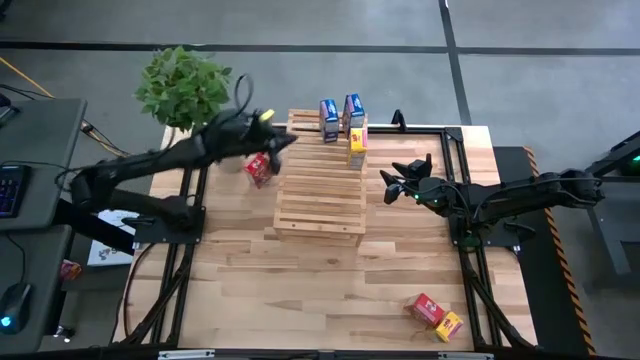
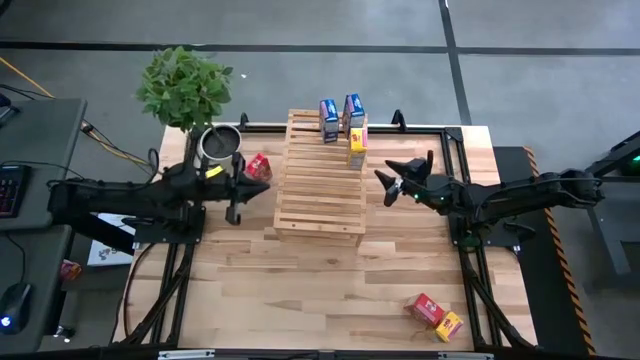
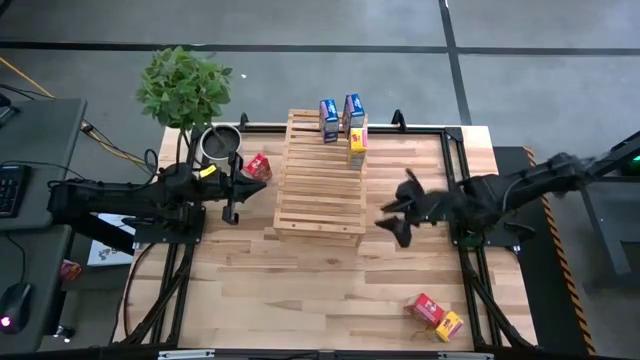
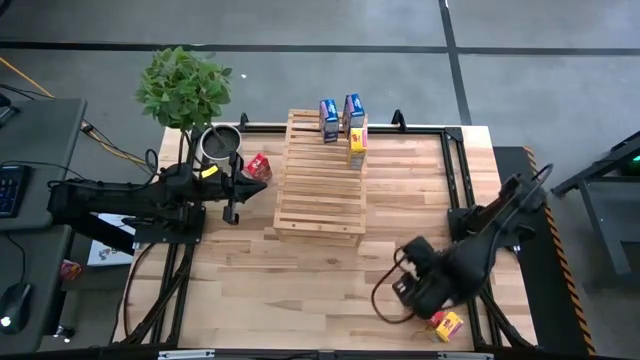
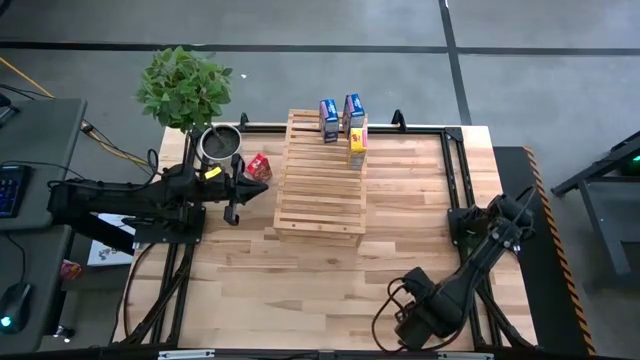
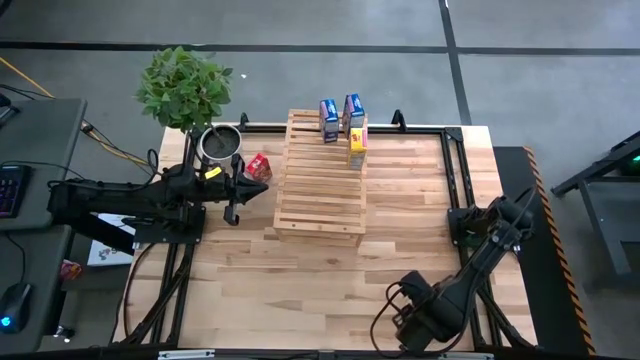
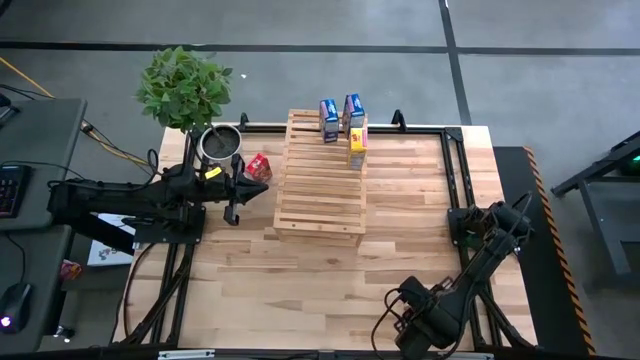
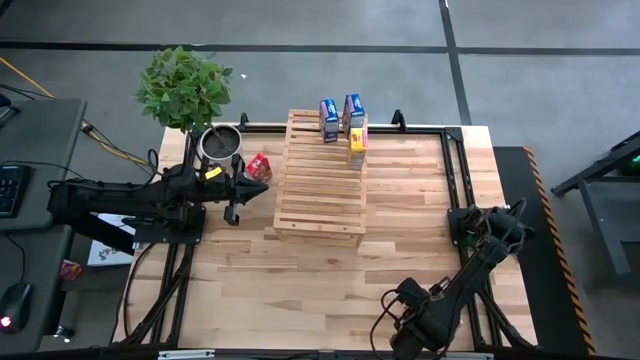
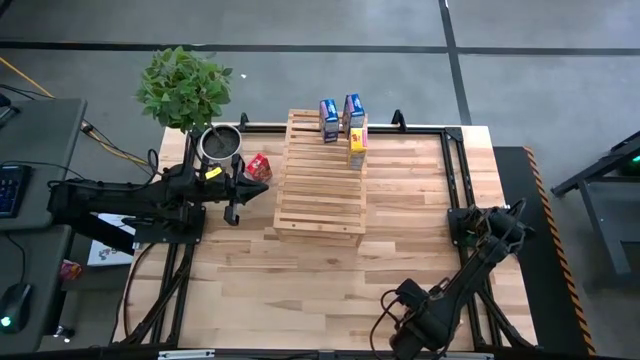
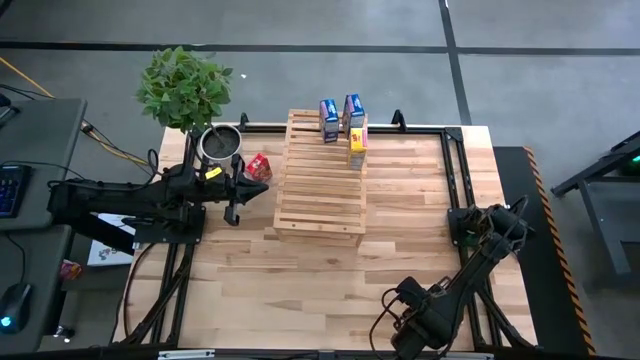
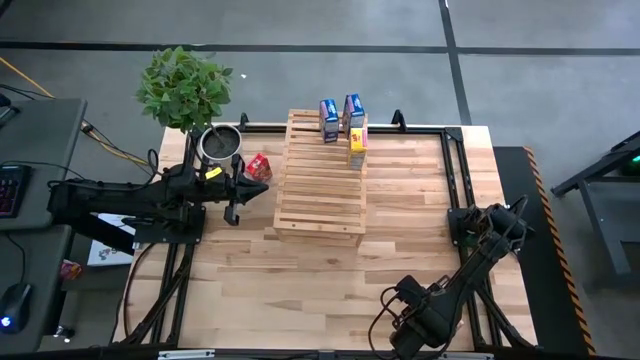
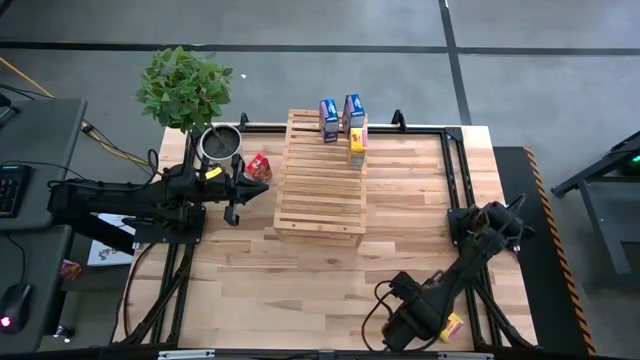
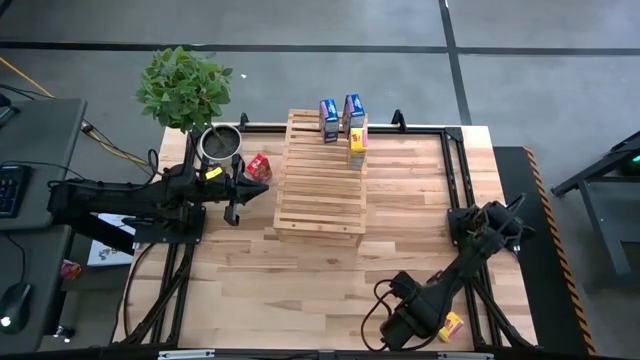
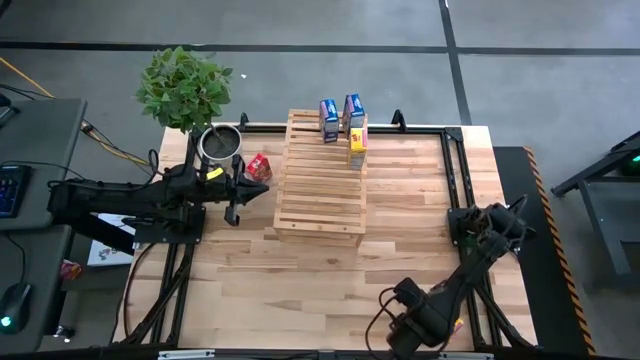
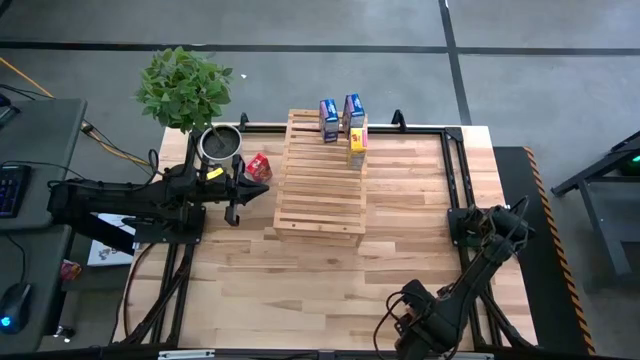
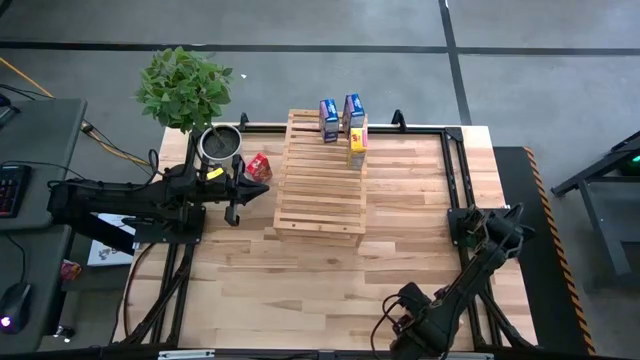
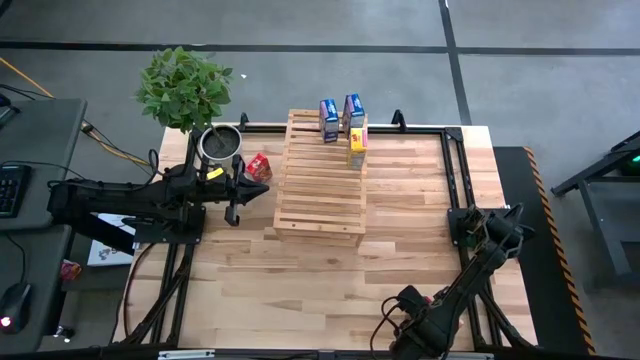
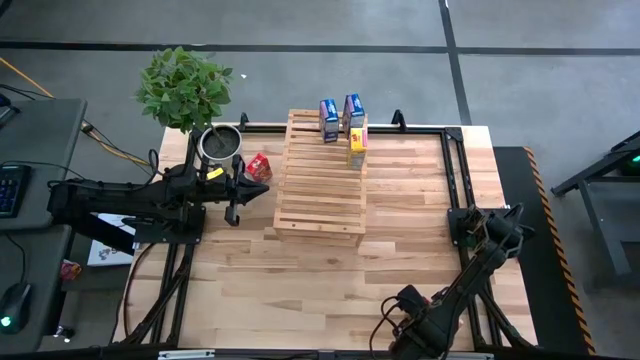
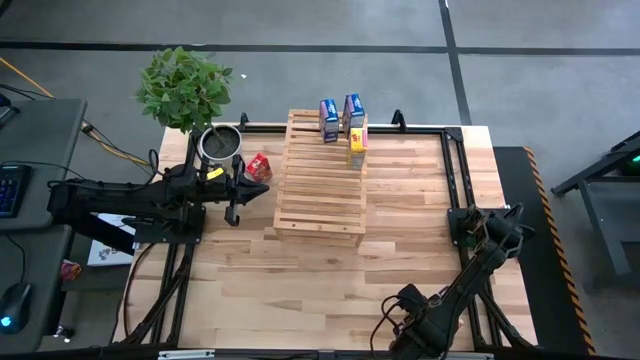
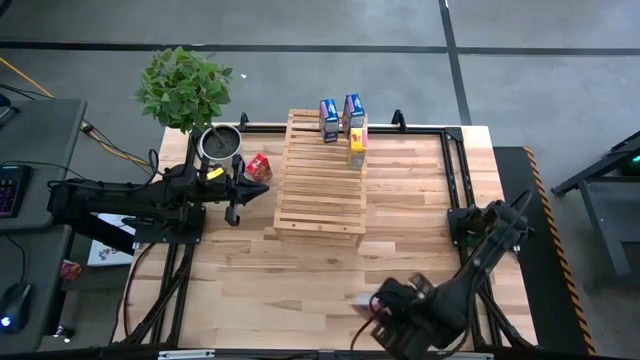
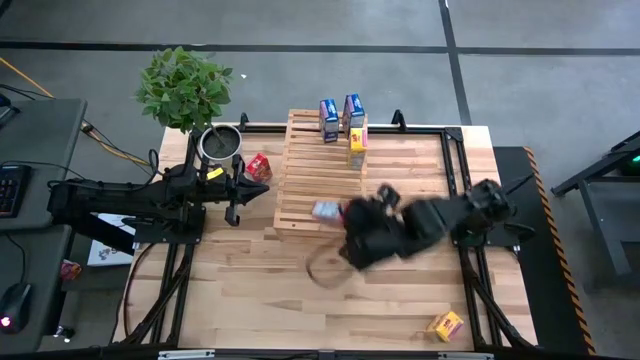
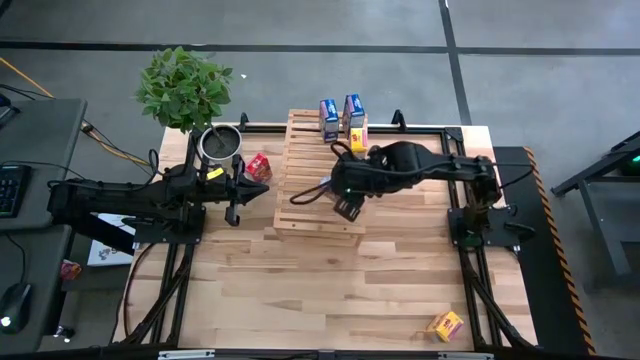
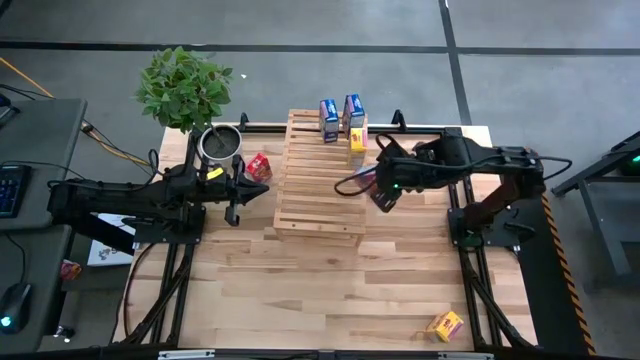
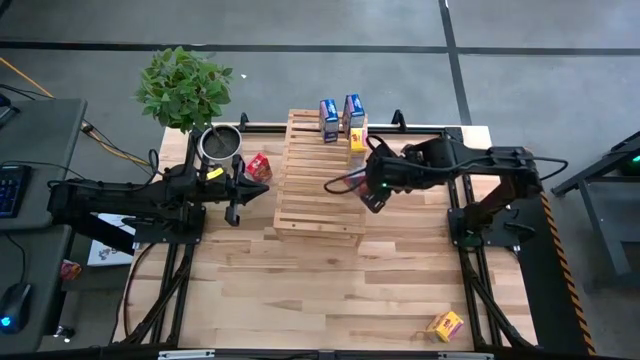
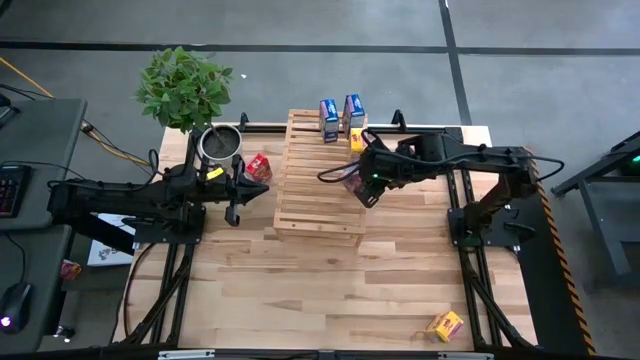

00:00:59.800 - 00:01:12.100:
Task: Stack cereal on shelf
Put the bottom red cereal box on the shelf

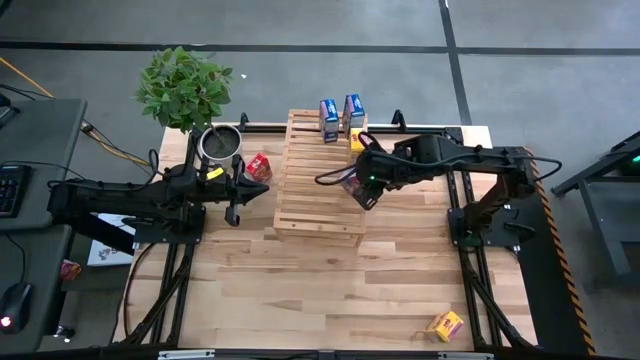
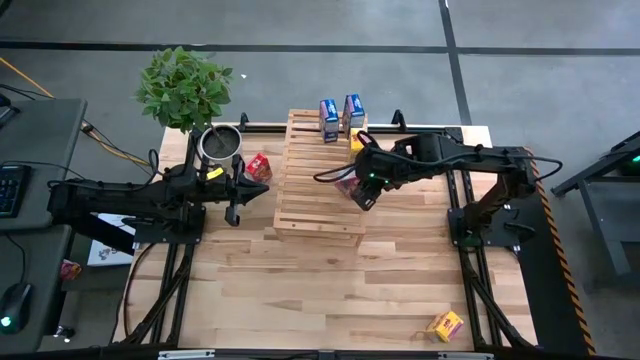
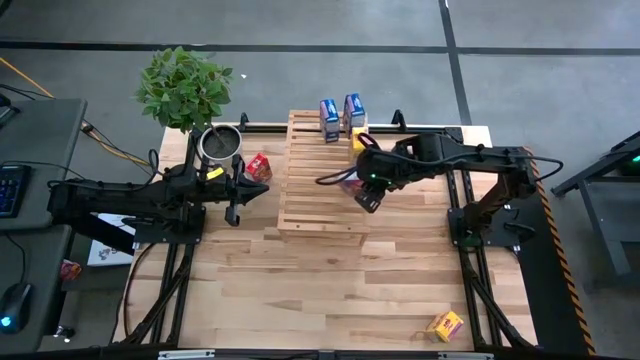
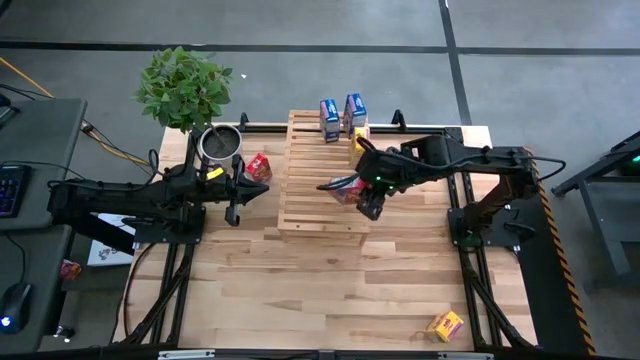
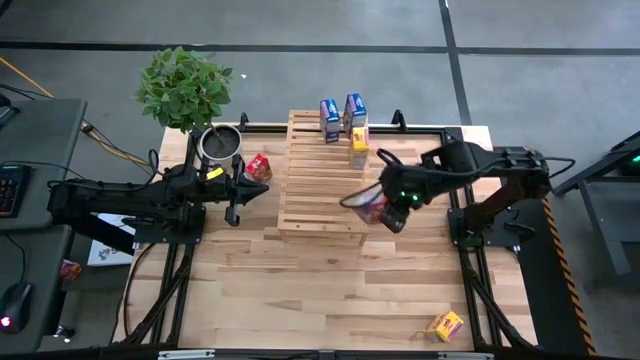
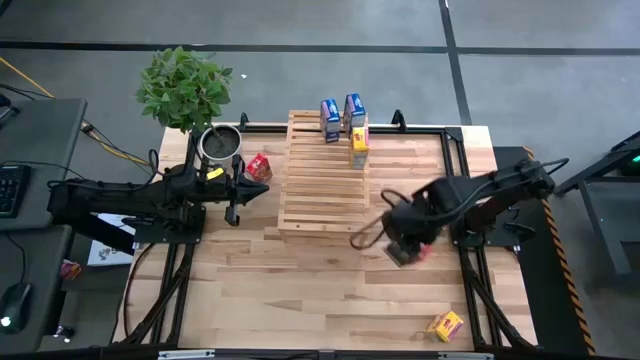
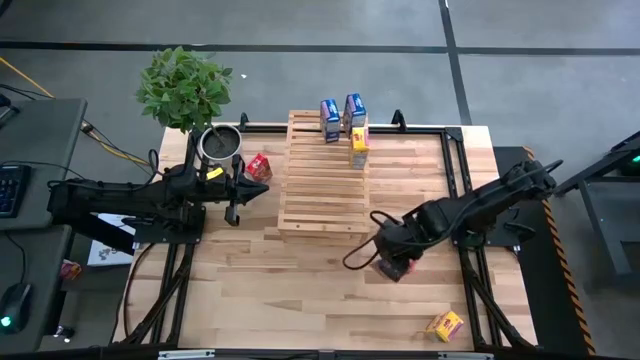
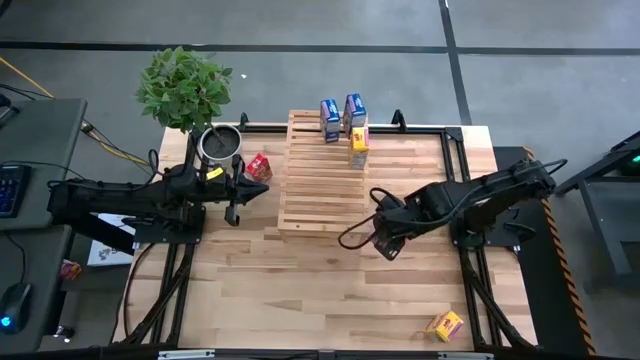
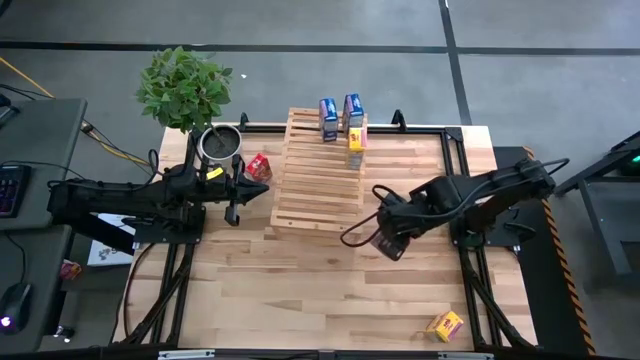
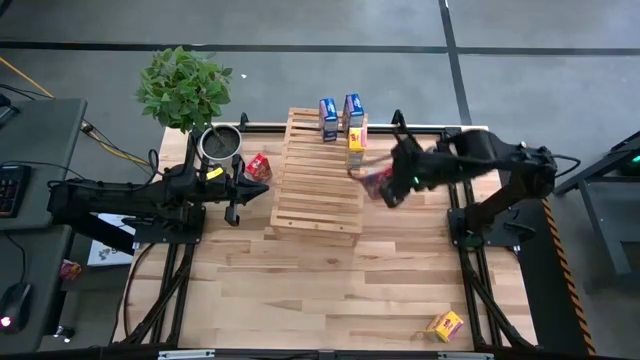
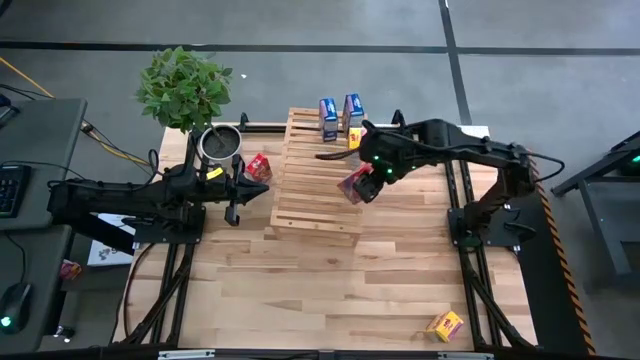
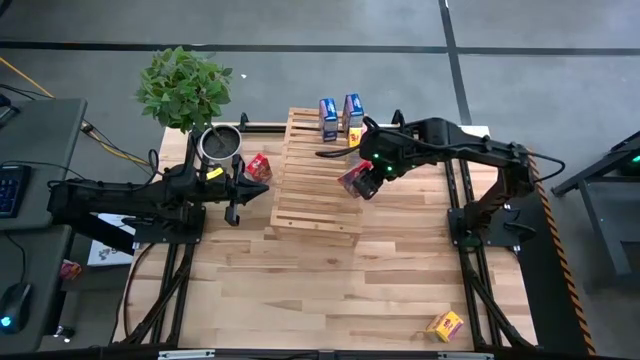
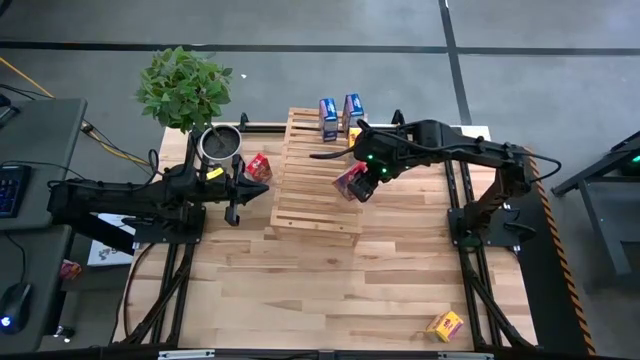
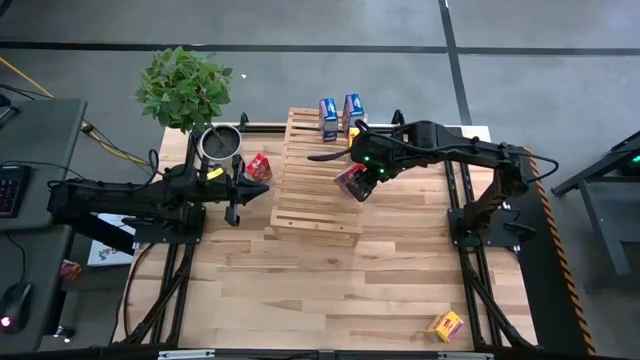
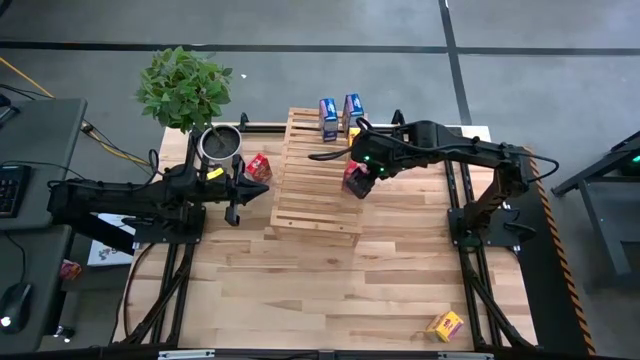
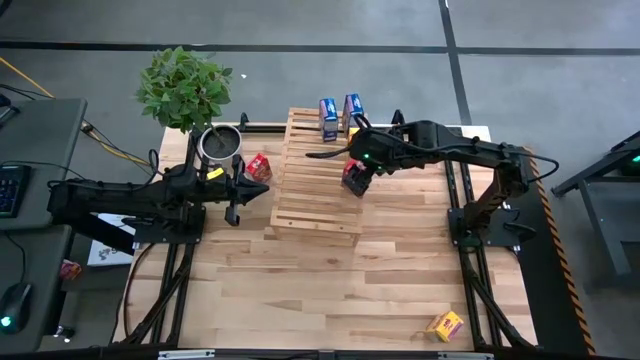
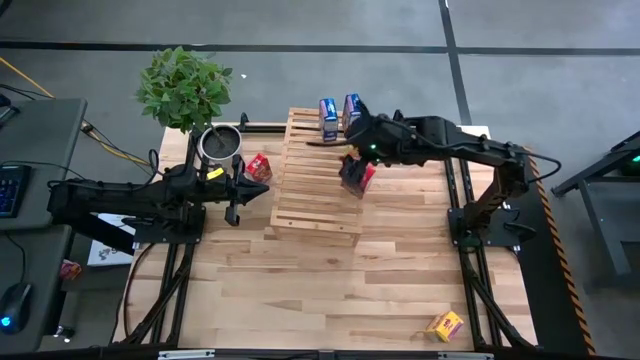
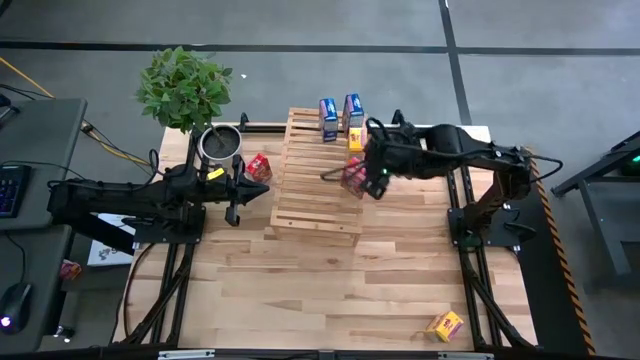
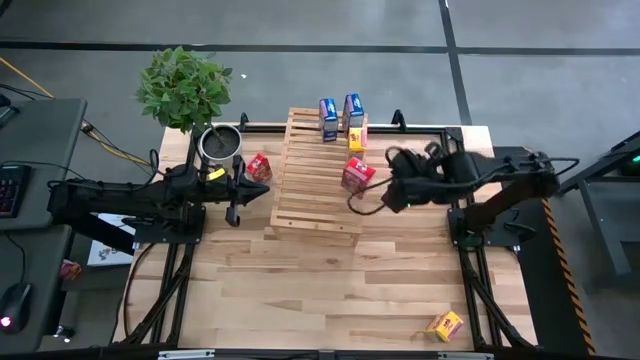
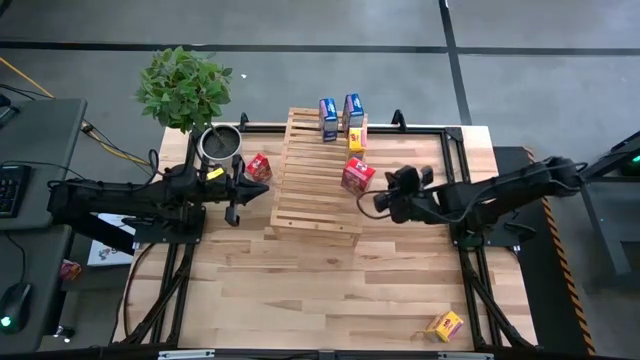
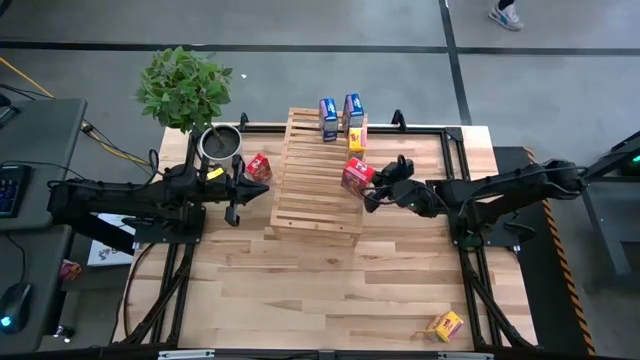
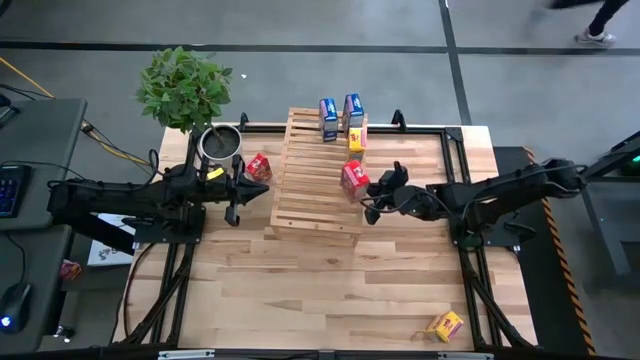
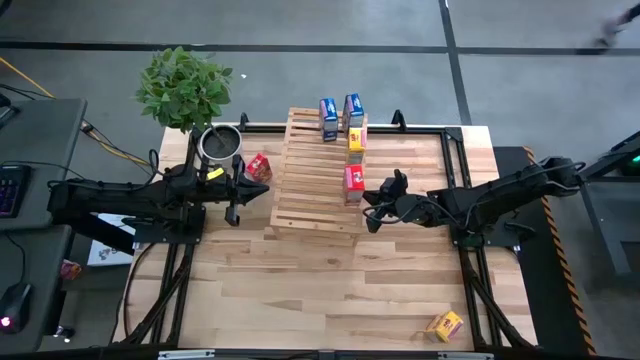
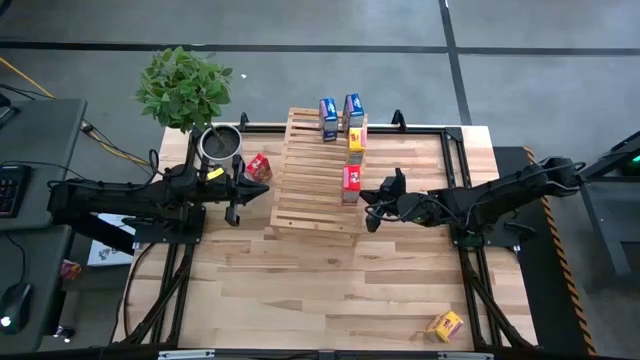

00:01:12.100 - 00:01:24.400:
Put the bottom red cereal box on the shelf
